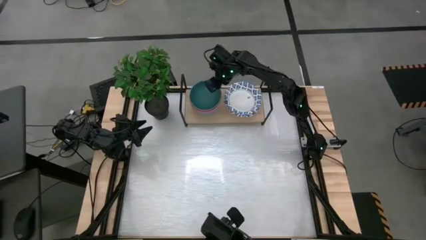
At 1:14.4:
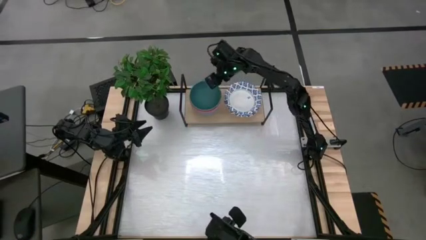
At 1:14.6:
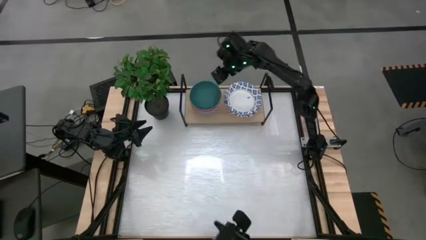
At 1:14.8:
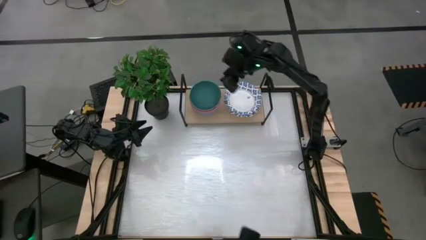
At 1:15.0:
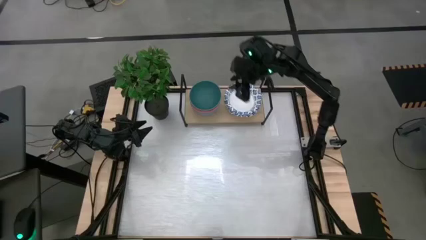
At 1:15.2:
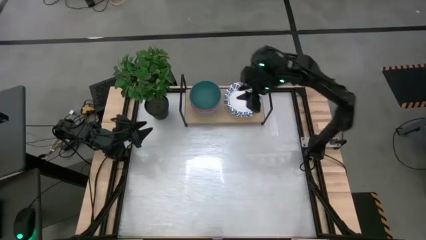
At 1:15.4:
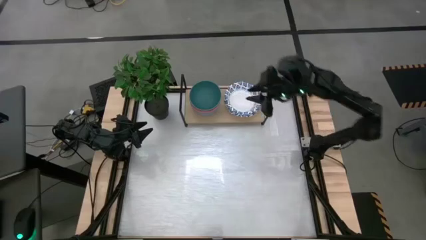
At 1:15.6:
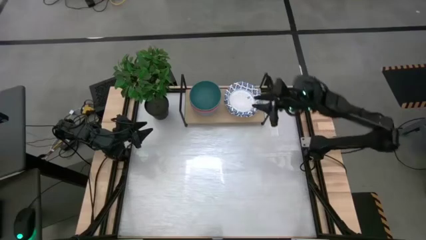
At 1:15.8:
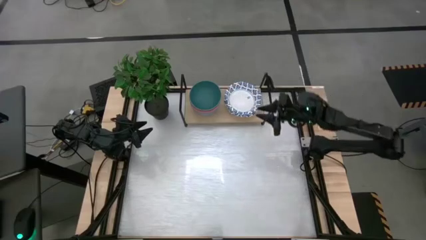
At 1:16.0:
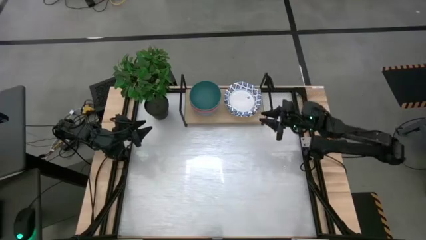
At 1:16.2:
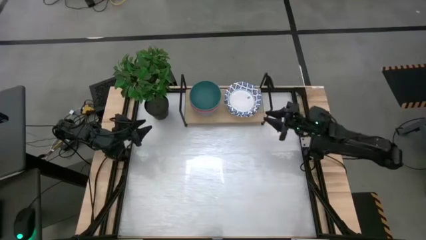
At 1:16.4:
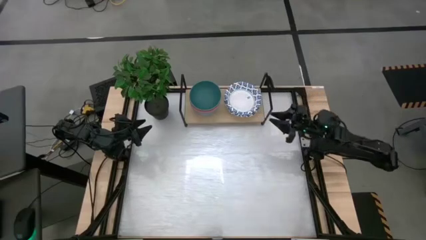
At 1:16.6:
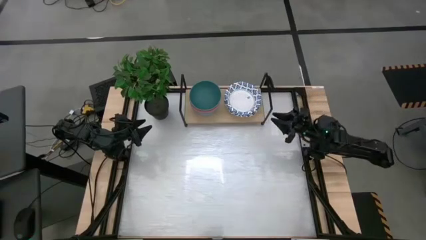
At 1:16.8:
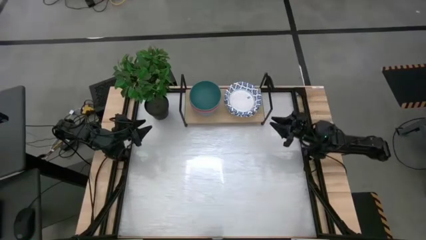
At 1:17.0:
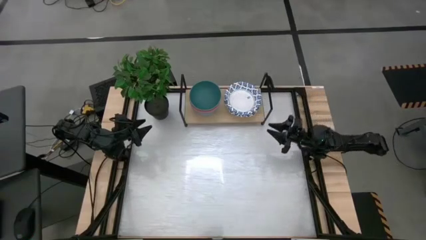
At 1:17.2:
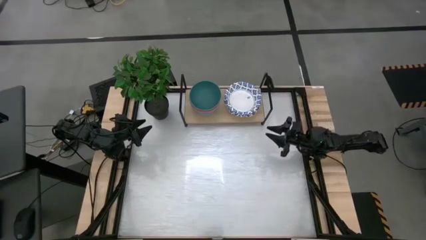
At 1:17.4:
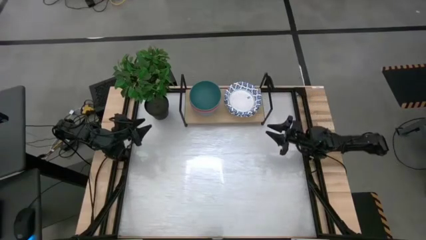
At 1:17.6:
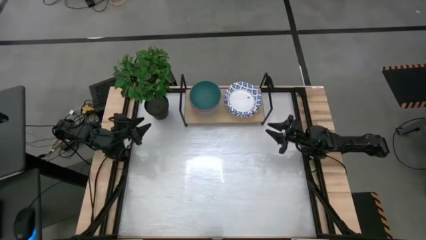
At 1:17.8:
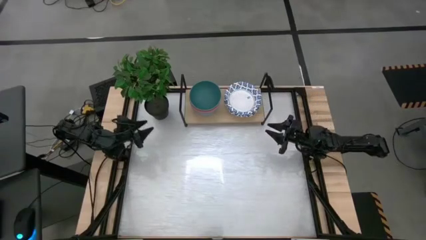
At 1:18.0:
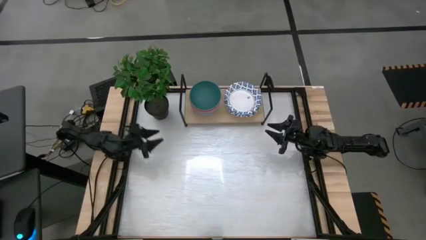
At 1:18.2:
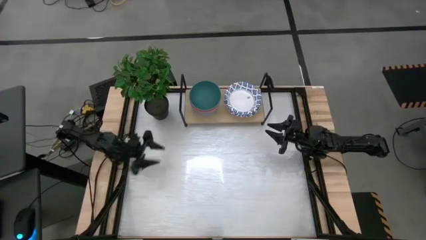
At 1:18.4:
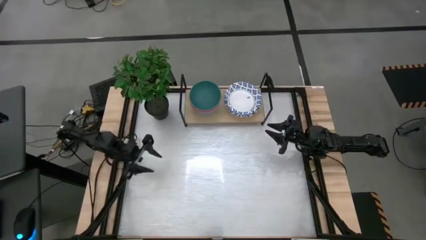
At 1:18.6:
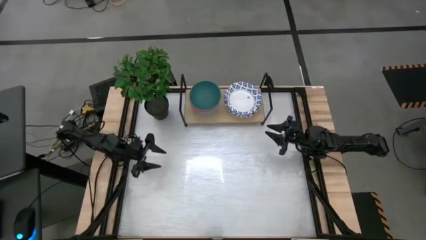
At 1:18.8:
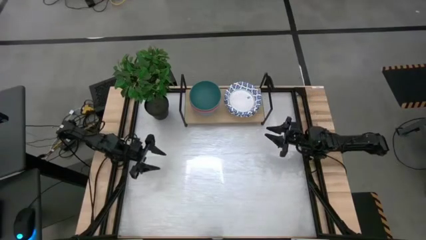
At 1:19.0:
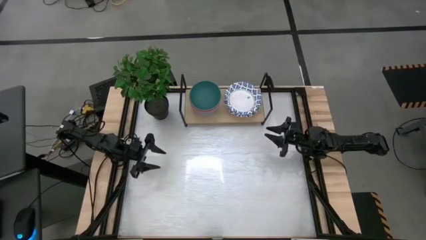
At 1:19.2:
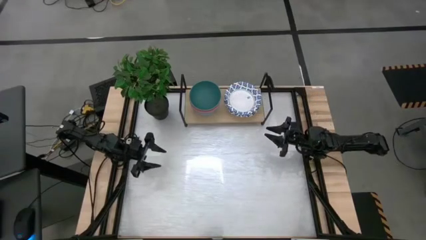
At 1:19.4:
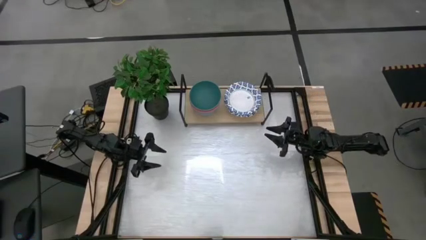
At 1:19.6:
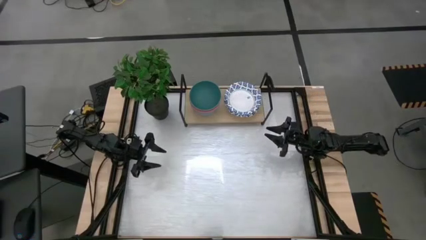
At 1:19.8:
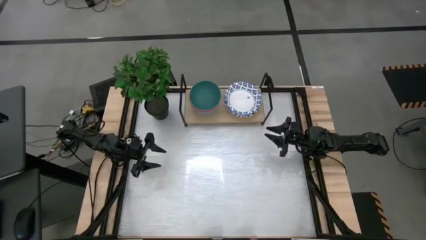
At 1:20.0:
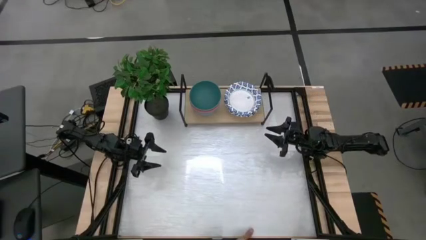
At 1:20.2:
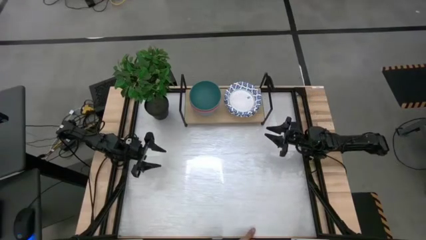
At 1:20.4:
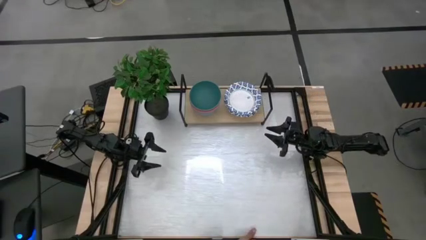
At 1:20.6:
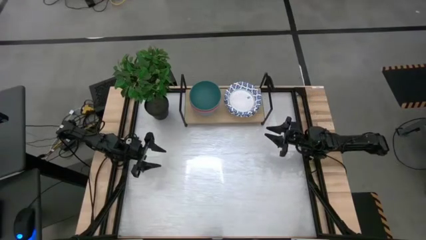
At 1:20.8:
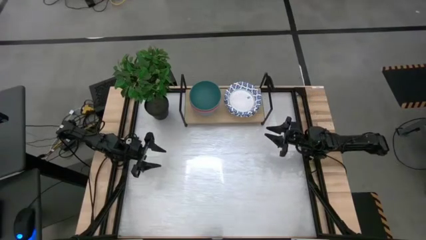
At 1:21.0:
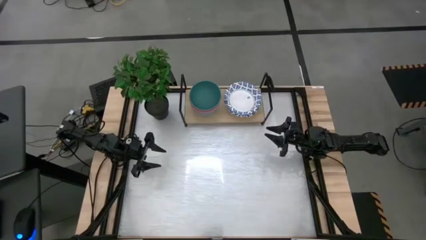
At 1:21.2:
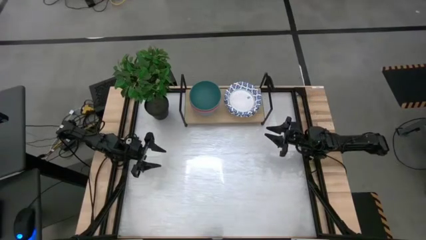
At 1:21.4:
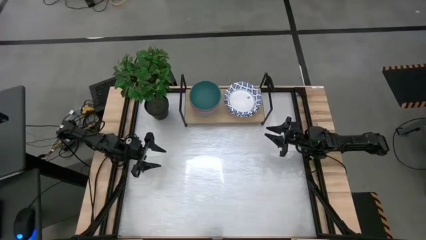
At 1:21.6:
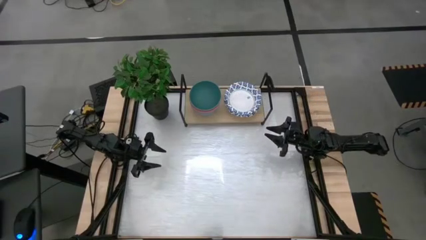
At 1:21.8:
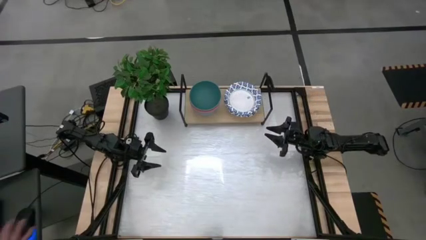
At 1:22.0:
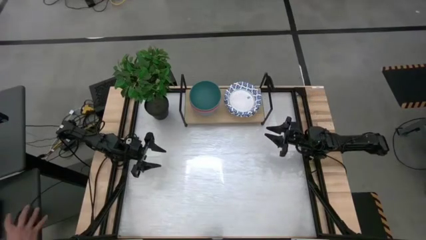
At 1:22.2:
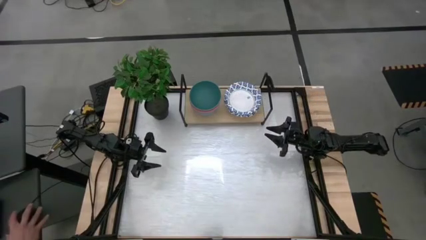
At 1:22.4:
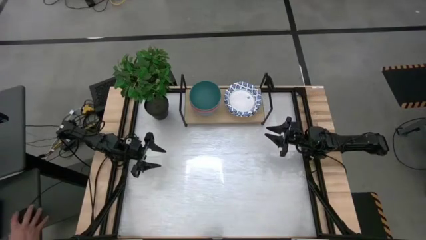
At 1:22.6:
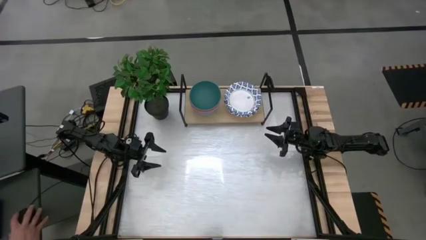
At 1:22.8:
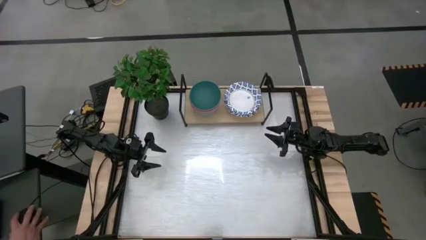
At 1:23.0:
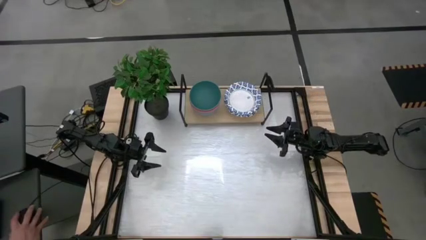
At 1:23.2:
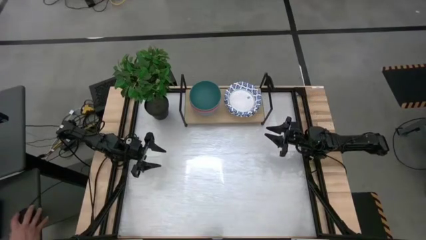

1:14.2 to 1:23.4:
Task: Place and stack bowls onto a shelf
Return to Home Position
